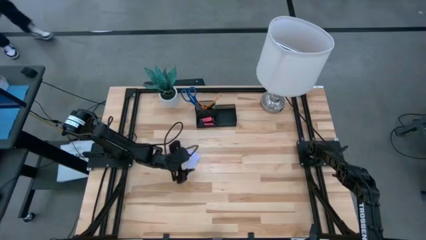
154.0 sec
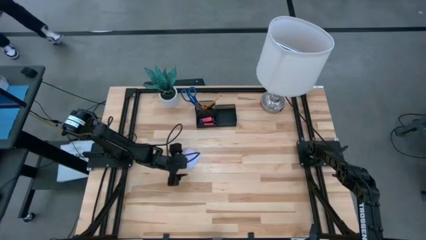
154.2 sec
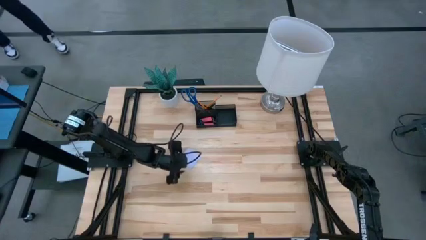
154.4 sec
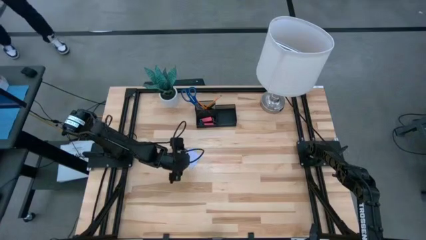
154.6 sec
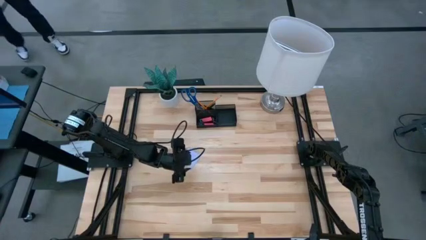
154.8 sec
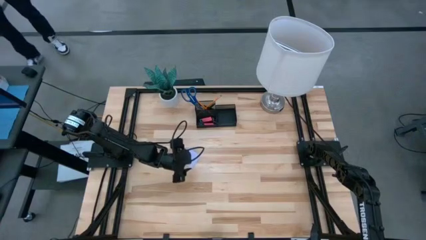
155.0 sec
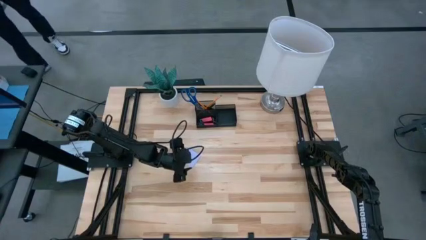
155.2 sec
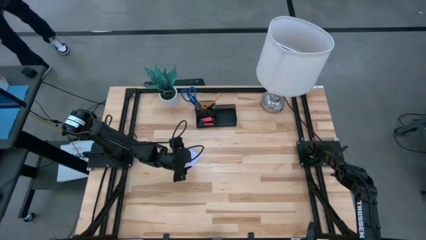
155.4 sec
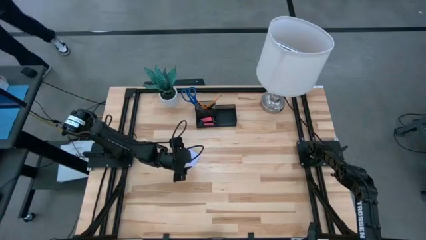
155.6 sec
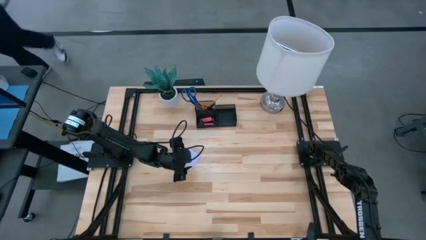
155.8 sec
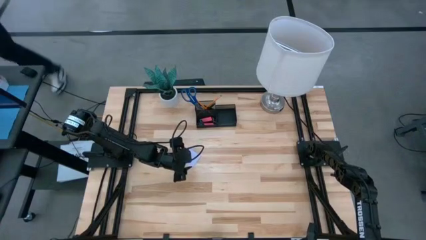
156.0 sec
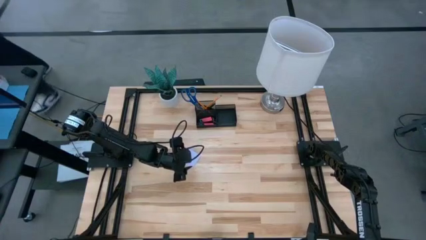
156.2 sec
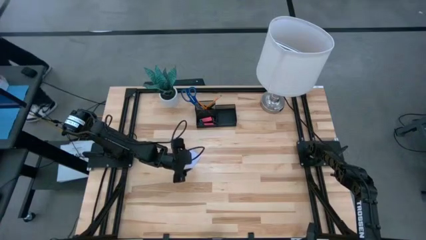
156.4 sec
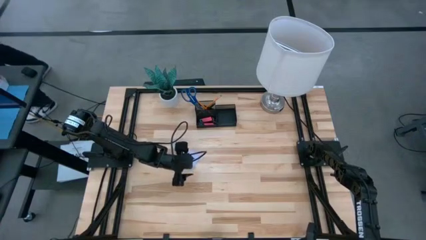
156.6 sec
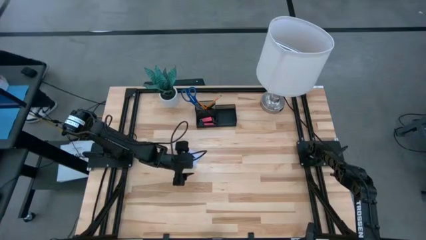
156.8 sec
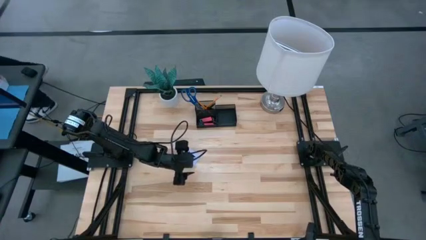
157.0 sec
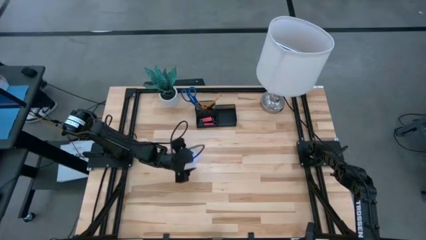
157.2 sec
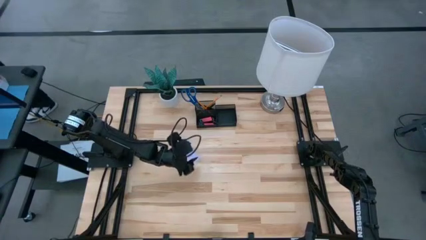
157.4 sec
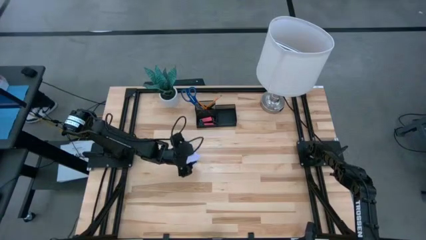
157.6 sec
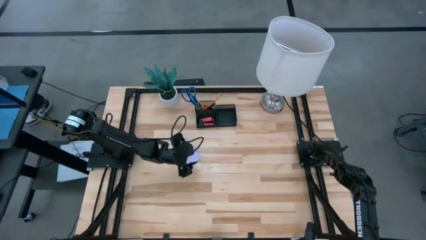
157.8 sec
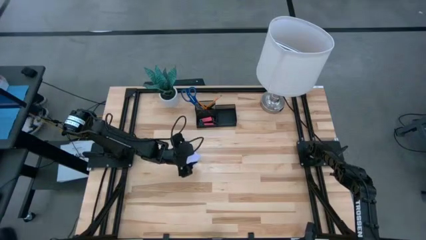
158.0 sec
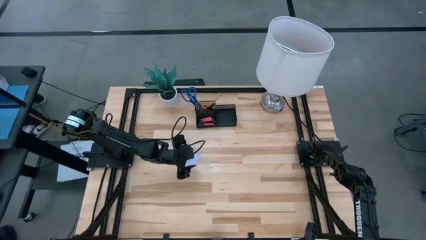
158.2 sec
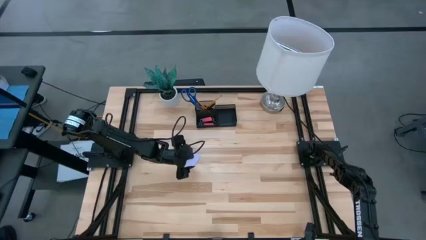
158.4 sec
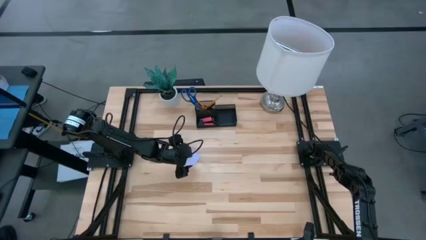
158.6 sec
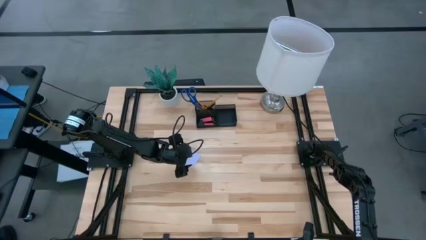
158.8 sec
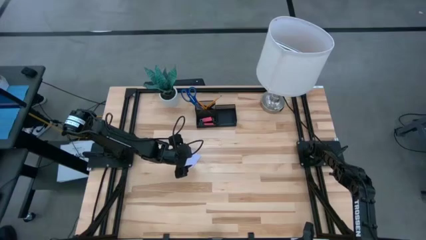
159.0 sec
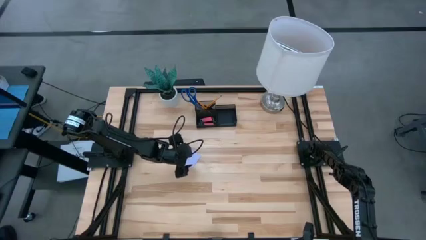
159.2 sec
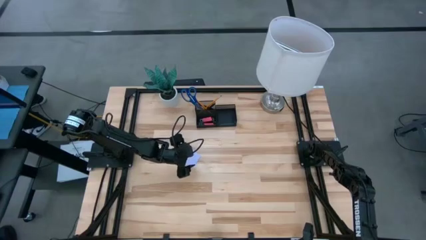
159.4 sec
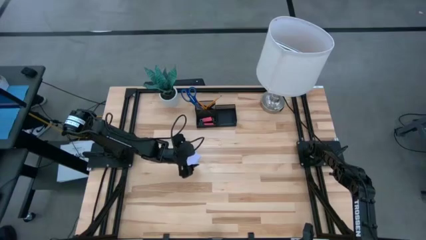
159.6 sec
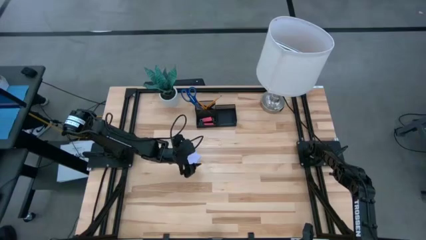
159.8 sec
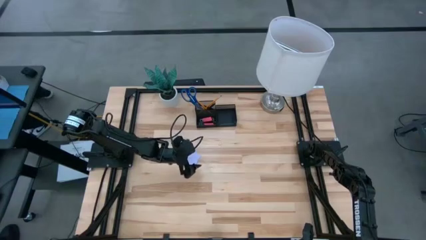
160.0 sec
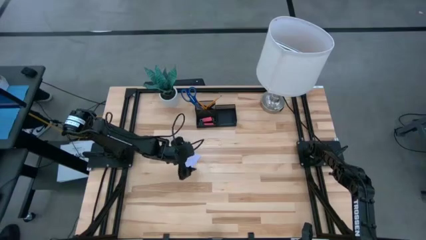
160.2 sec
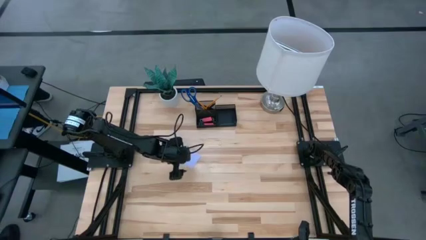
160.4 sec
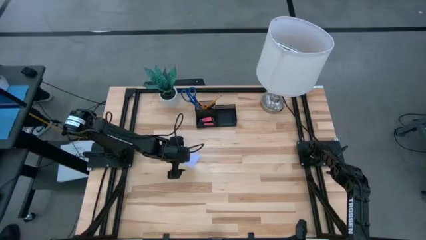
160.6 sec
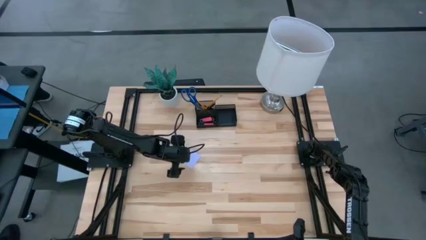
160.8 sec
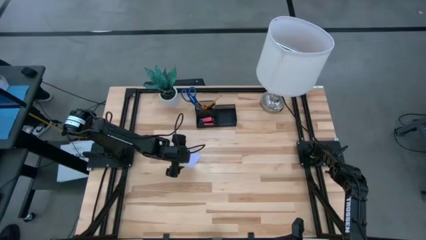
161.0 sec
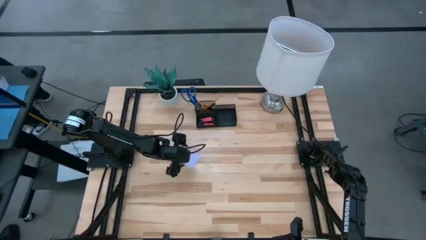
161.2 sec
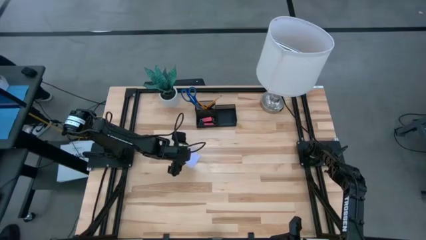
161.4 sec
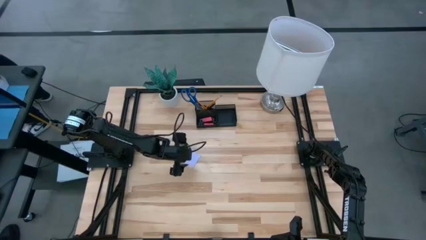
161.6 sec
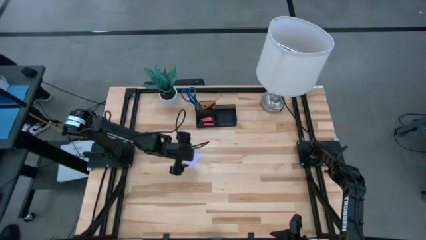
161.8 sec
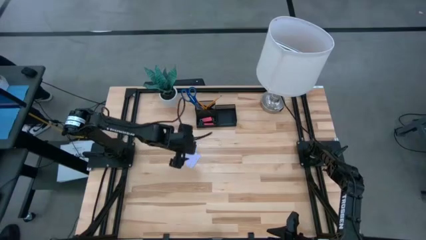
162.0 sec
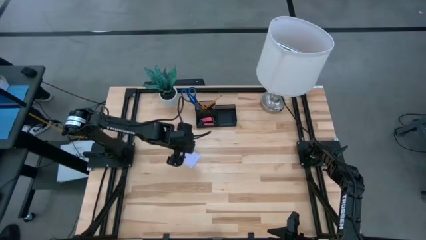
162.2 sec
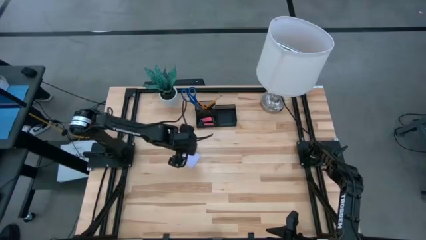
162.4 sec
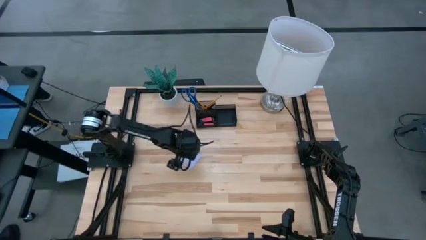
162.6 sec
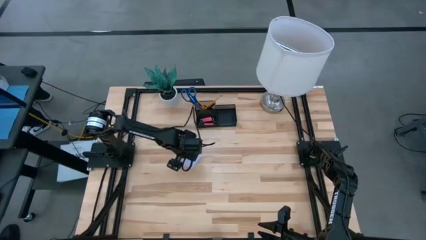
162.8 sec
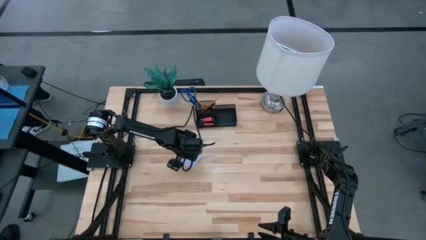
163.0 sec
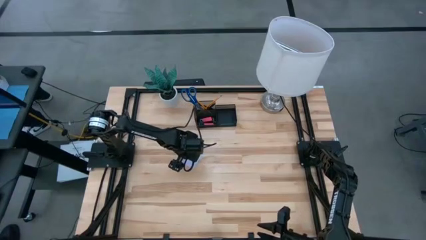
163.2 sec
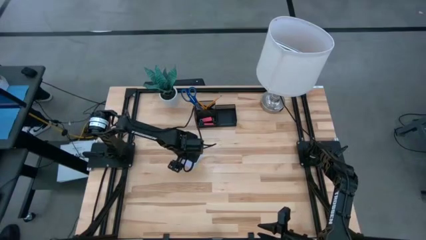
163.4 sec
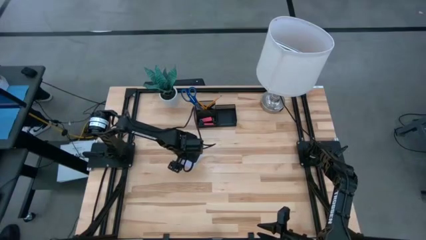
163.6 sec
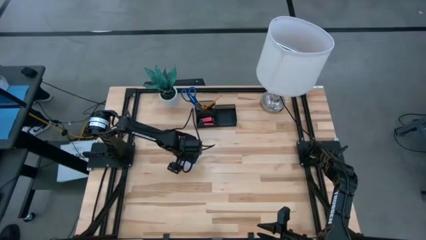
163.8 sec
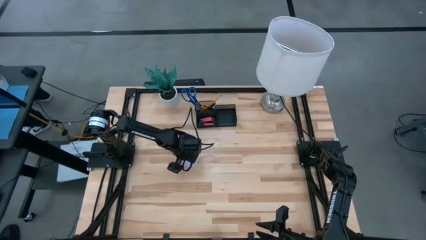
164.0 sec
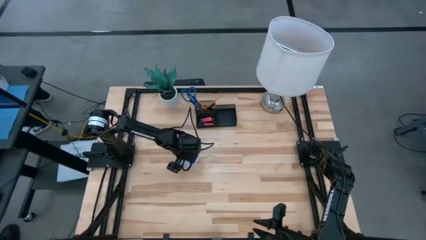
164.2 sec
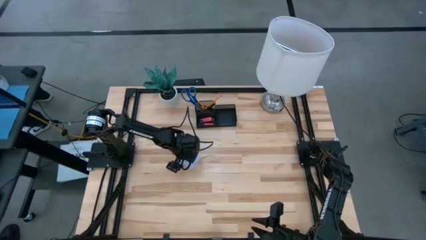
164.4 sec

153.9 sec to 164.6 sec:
Task: Pick and place office supplies into organizer
Put the white sticky notes into the desk organizer

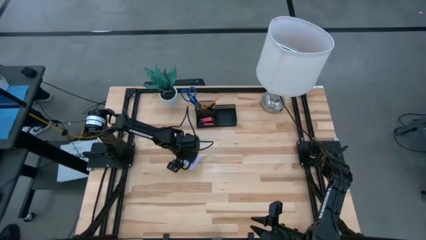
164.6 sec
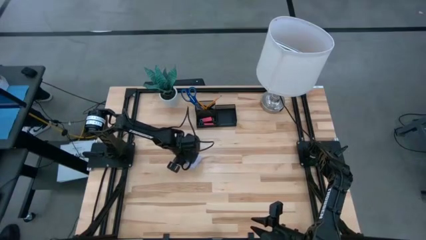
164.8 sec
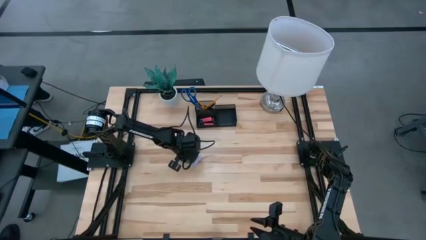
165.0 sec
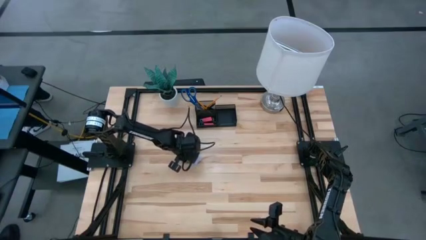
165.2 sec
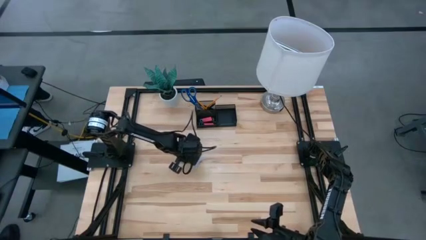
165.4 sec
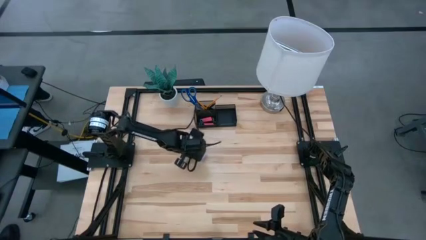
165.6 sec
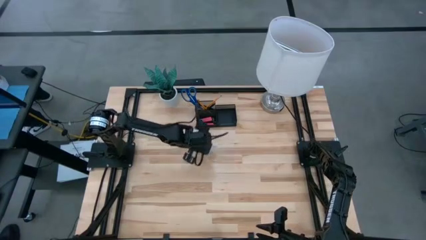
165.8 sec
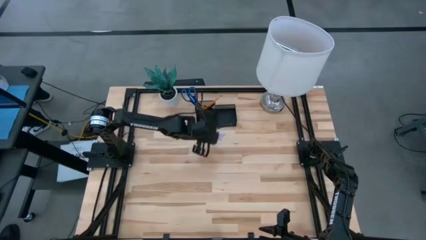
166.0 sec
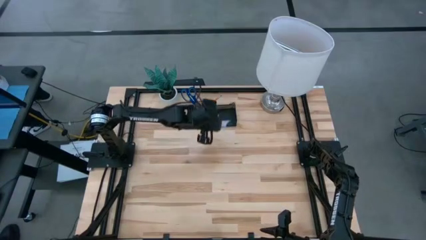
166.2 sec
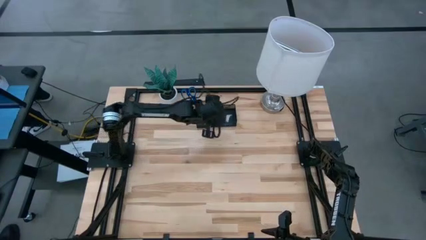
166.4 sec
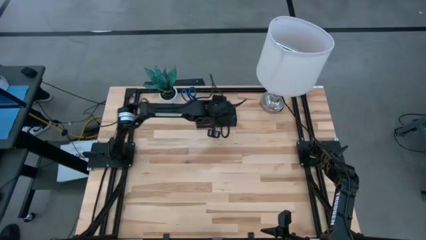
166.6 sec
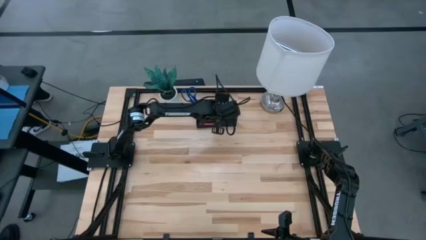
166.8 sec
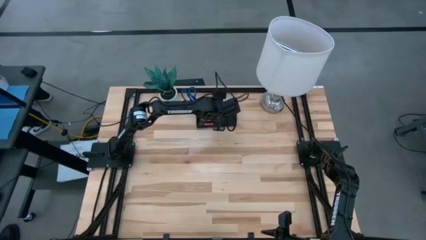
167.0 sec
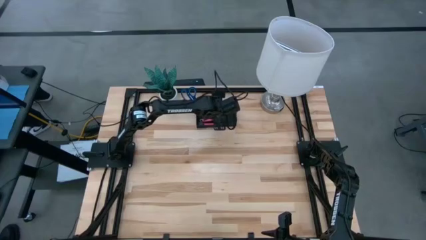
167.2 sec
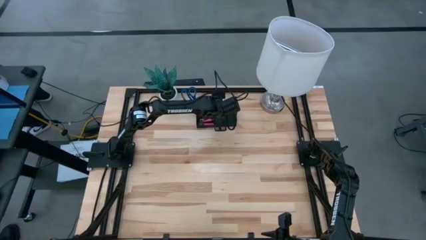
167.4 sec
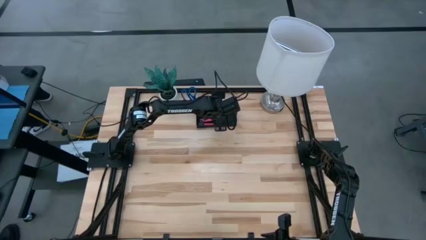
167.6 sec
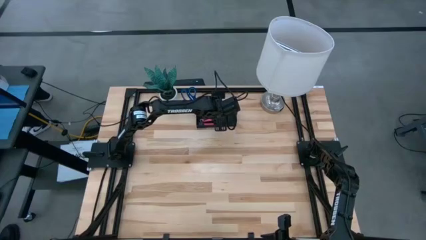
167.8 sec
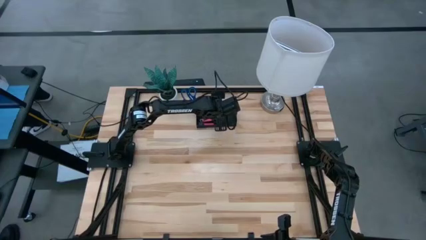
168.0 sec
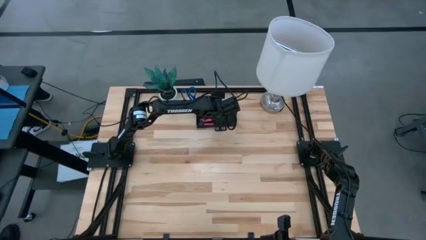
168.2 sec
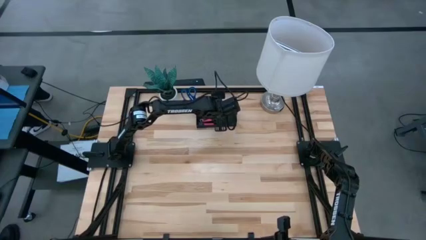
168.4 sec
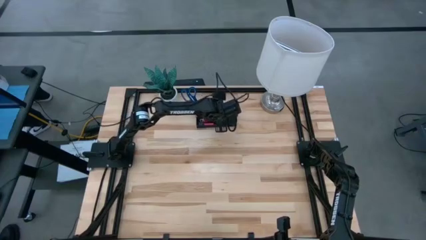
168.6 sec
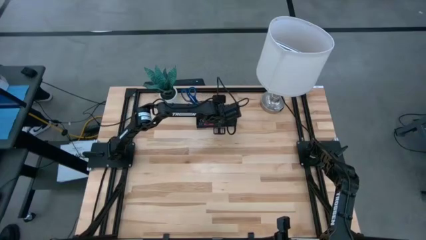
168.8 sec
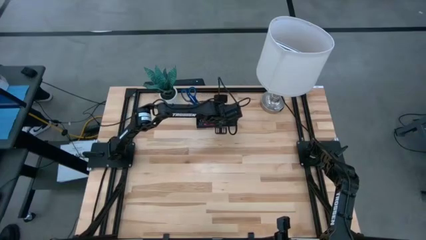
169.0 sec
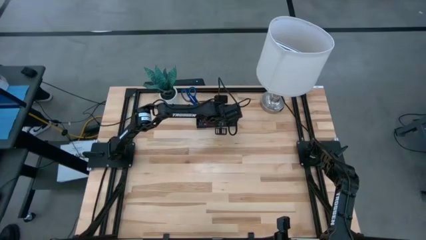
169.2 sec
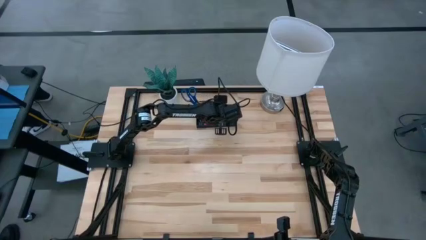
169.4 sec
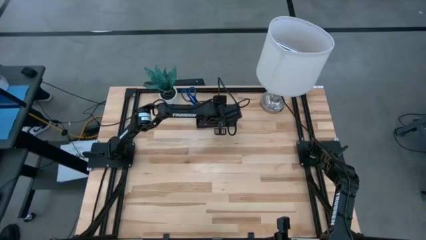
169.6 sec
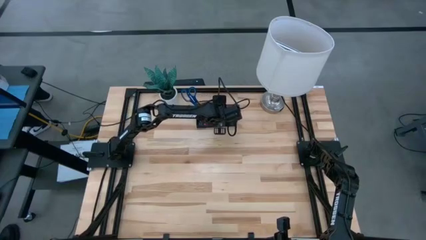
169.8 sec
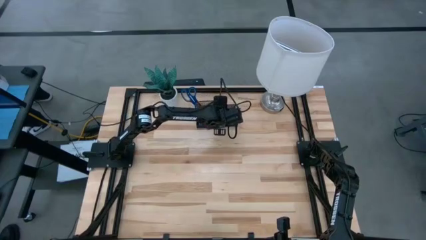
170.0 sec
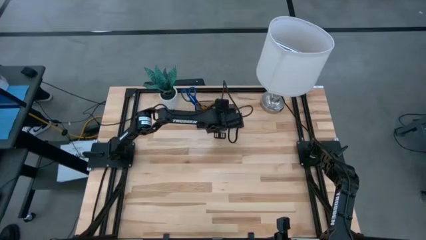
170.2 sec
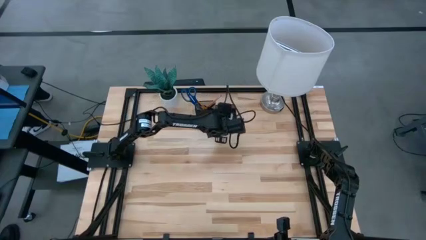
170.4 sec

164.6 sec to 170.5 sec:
Put the white sticky notes into the desk organizer

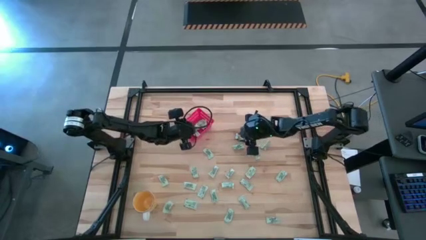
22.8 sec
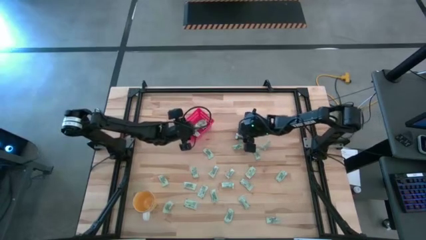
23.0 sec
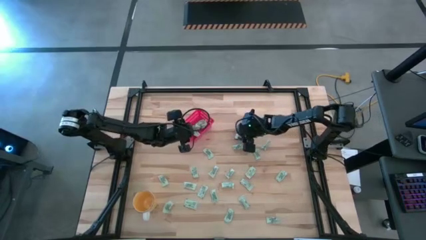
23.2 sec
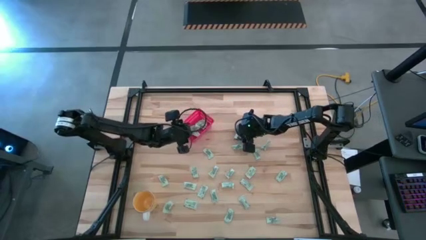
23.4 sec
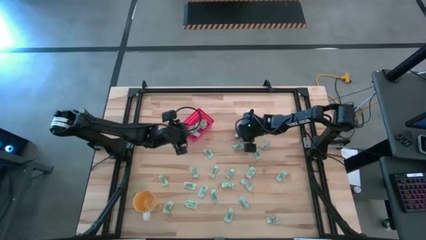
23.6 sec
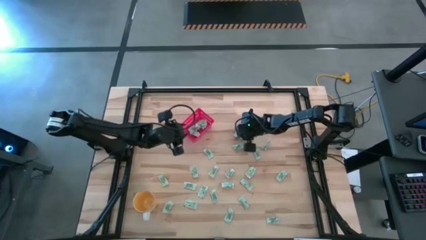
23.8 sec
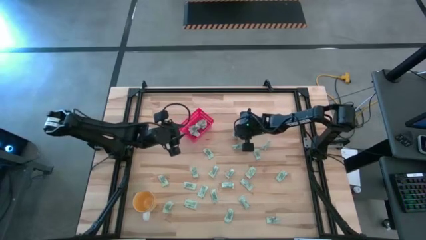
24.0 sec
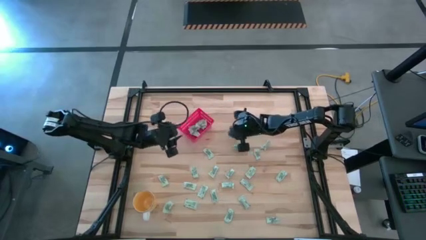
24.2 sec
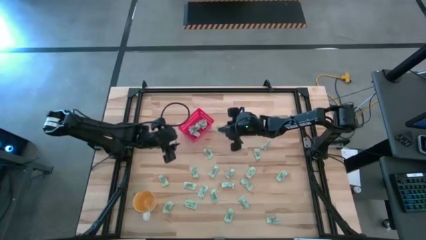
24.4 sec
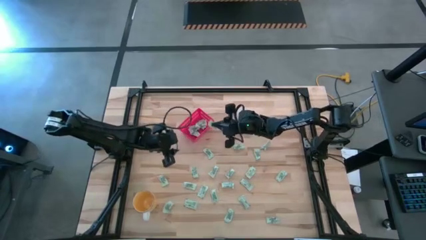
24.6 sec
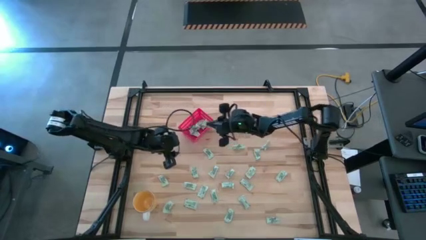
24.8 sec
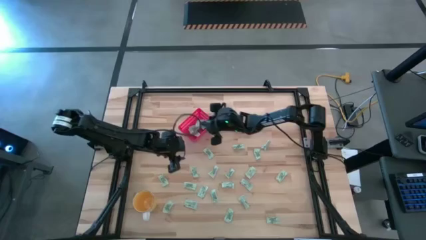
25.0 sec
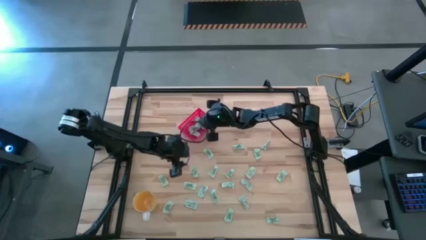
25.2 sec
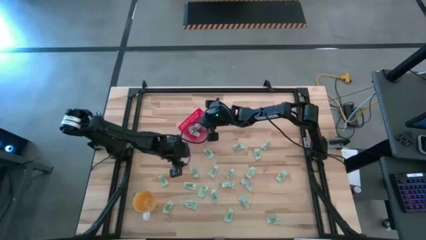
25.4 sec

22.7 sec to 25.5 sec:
Task: Pick and place Stevia / Truvia into bins
Put the white stevia packet into the red bin
